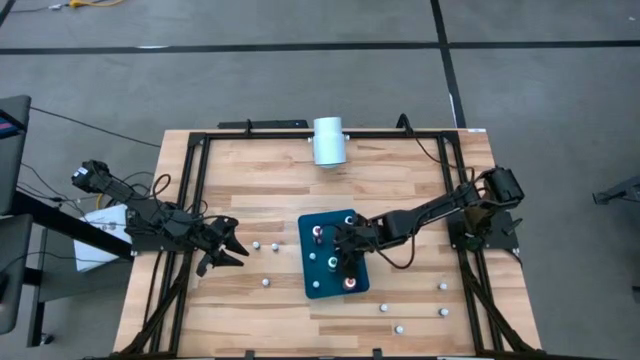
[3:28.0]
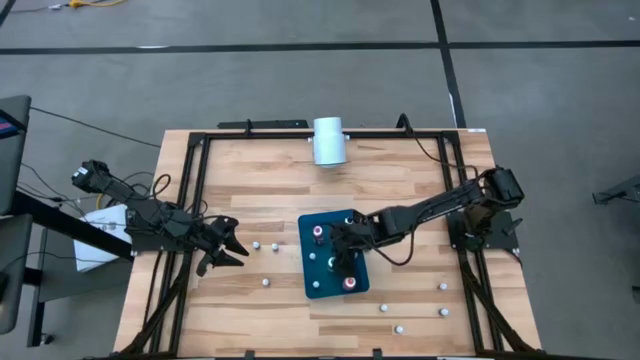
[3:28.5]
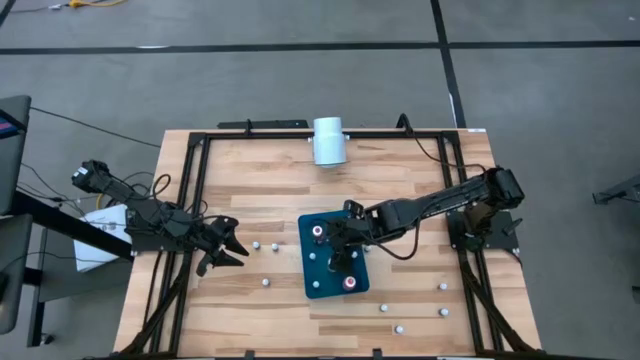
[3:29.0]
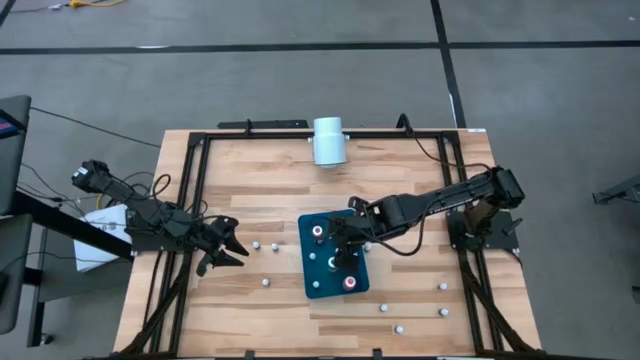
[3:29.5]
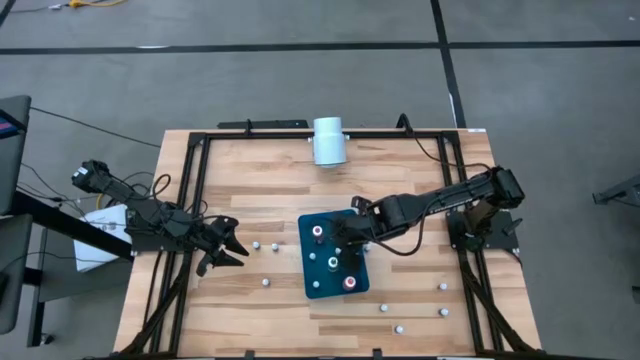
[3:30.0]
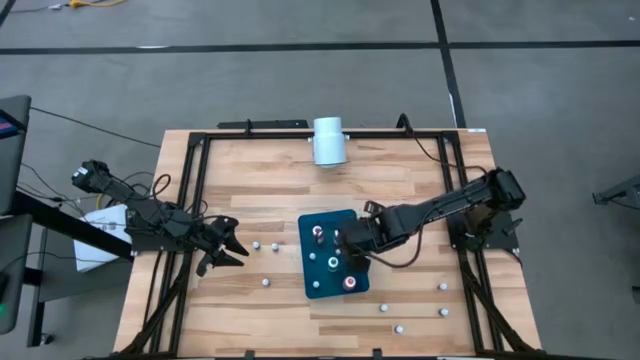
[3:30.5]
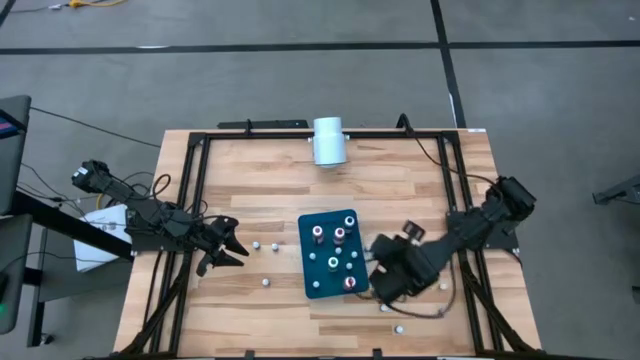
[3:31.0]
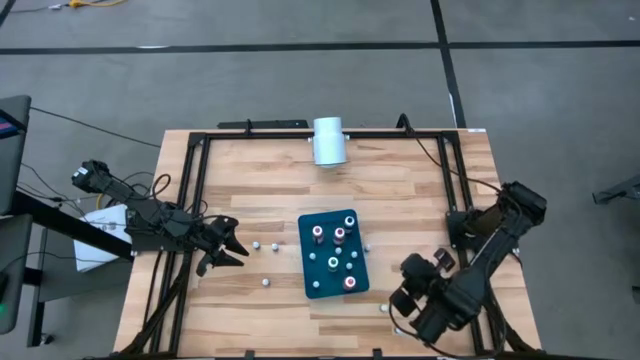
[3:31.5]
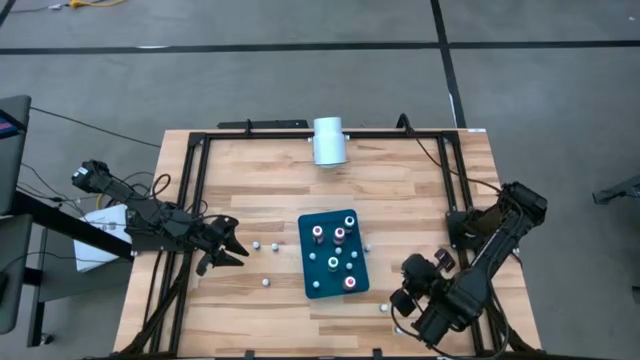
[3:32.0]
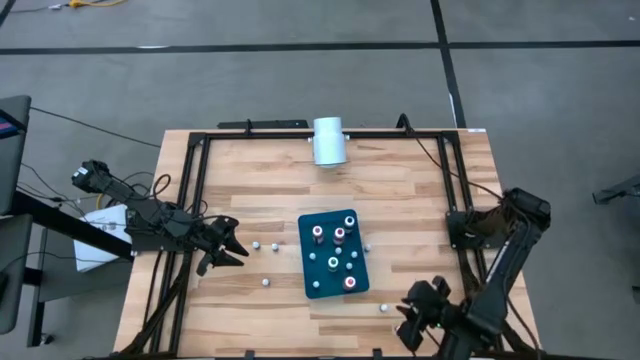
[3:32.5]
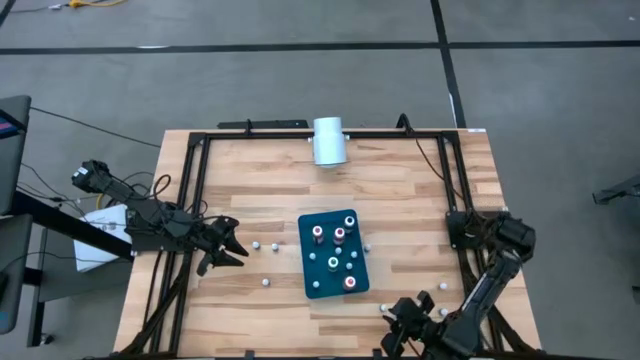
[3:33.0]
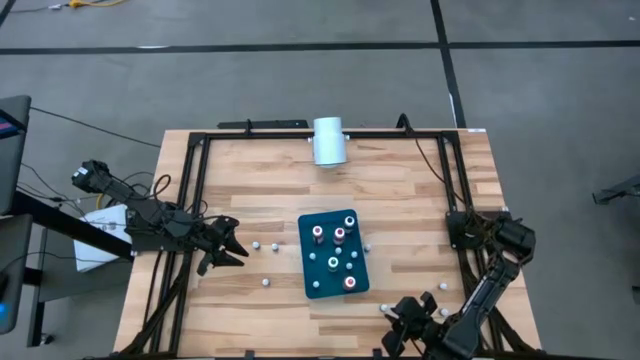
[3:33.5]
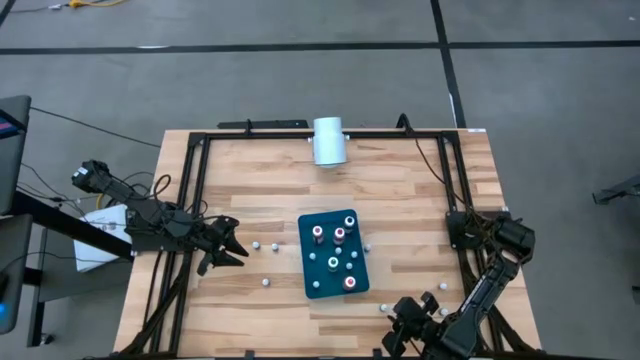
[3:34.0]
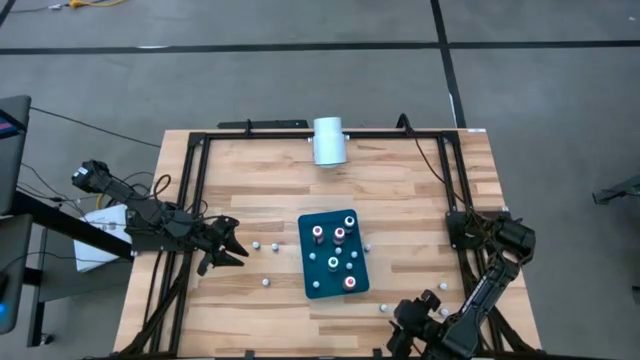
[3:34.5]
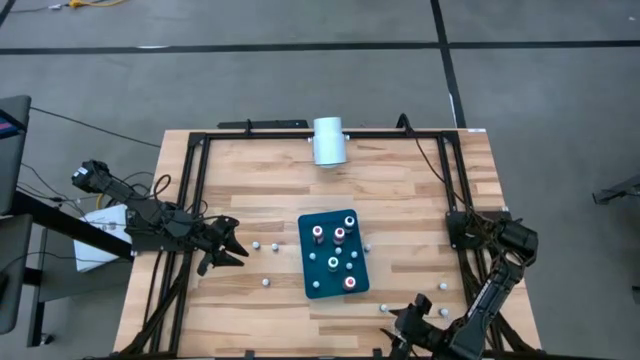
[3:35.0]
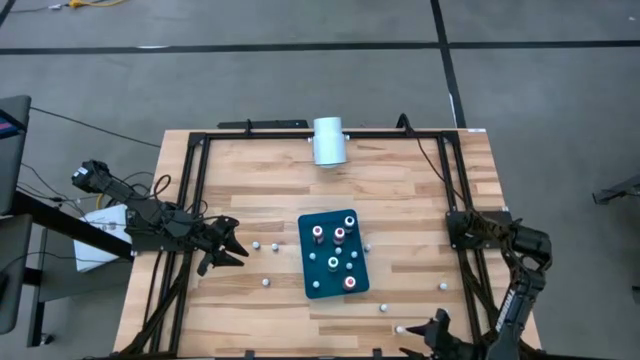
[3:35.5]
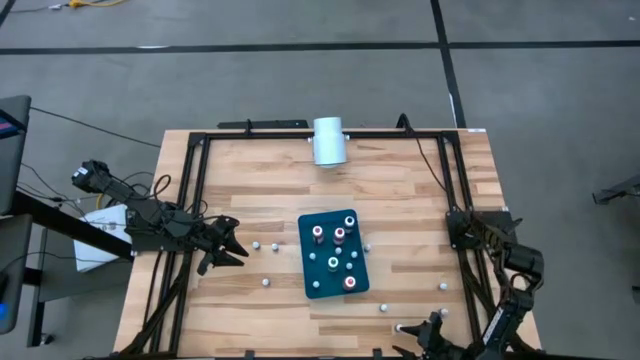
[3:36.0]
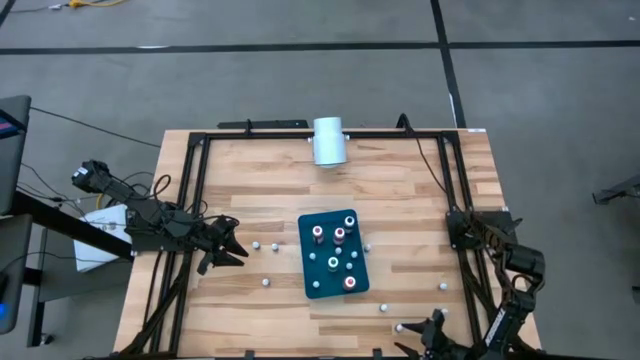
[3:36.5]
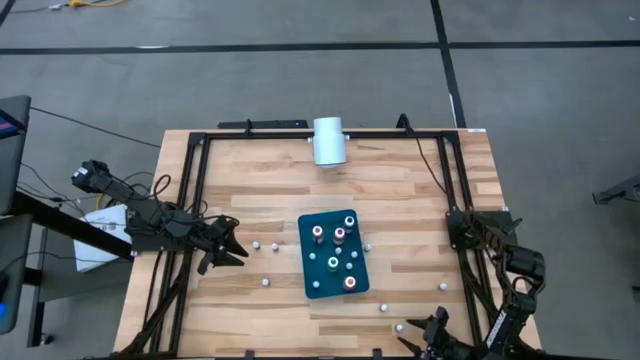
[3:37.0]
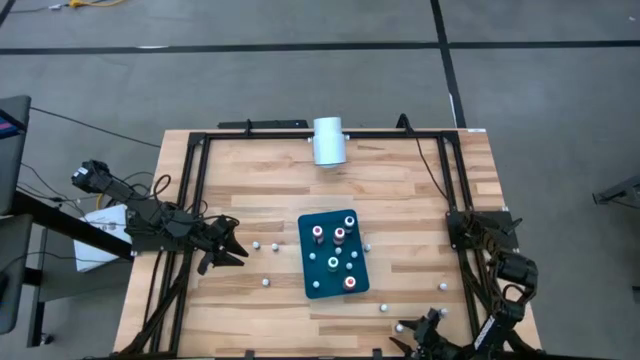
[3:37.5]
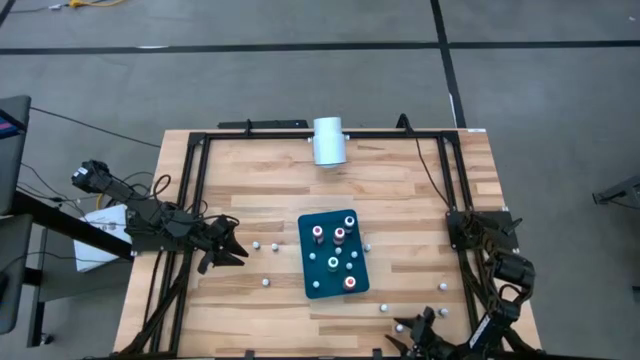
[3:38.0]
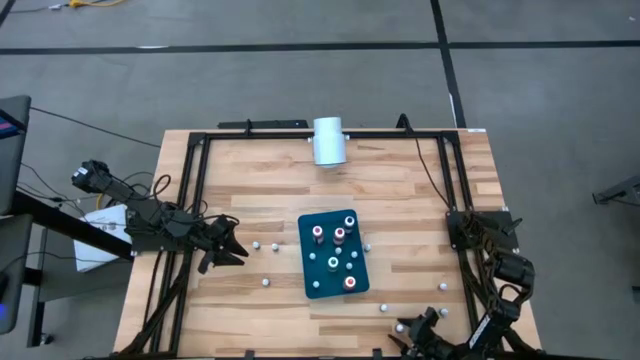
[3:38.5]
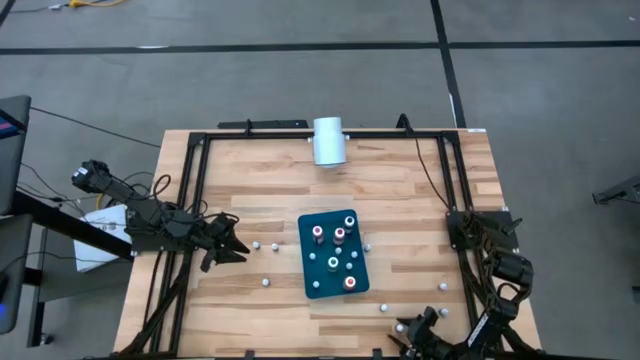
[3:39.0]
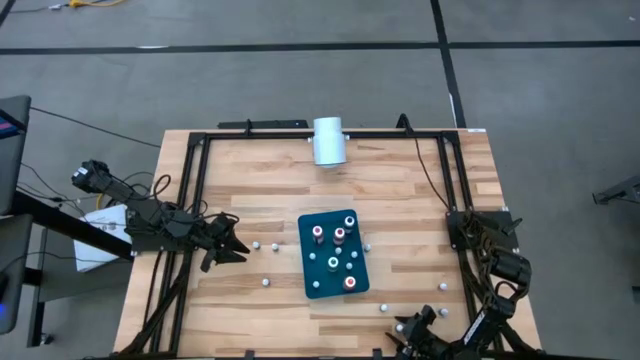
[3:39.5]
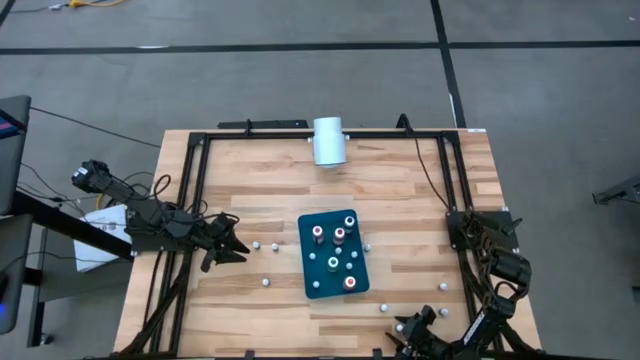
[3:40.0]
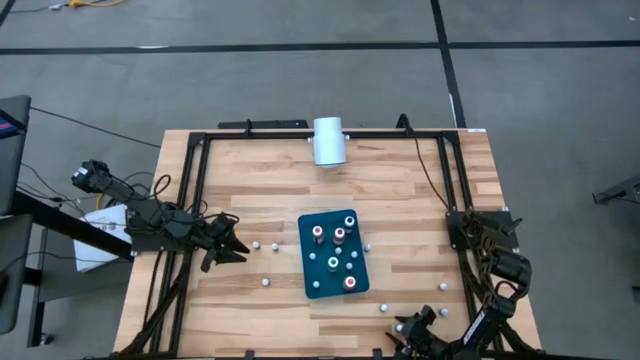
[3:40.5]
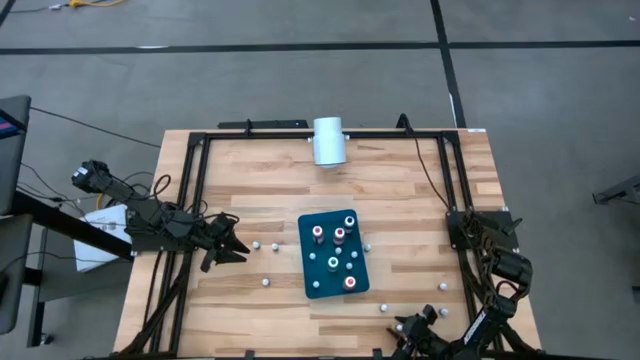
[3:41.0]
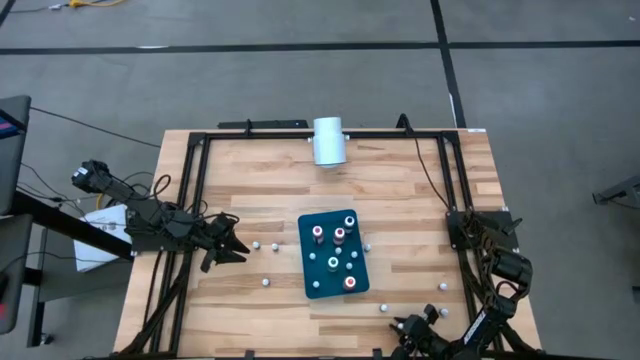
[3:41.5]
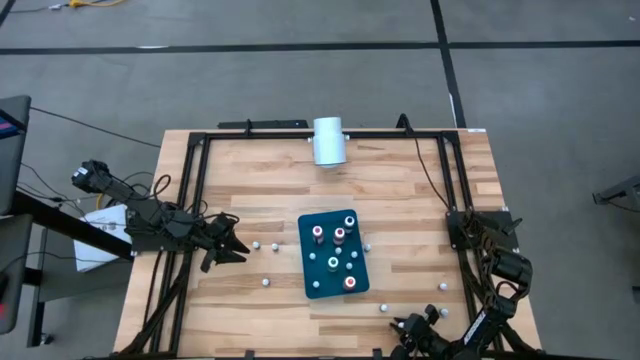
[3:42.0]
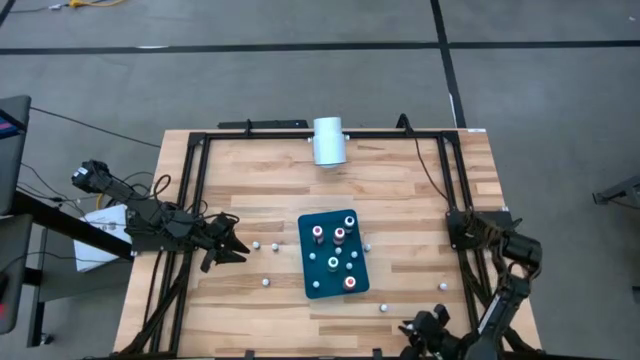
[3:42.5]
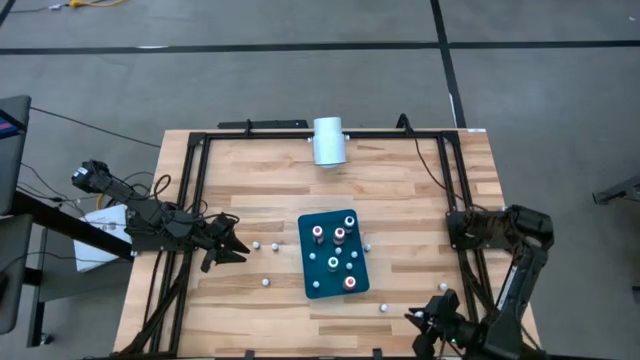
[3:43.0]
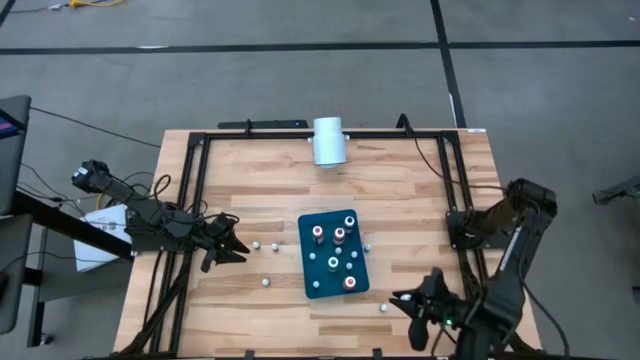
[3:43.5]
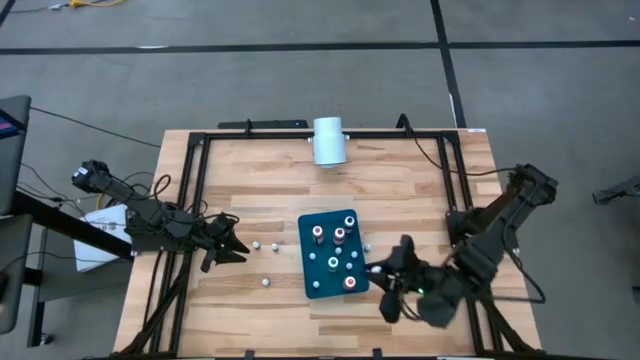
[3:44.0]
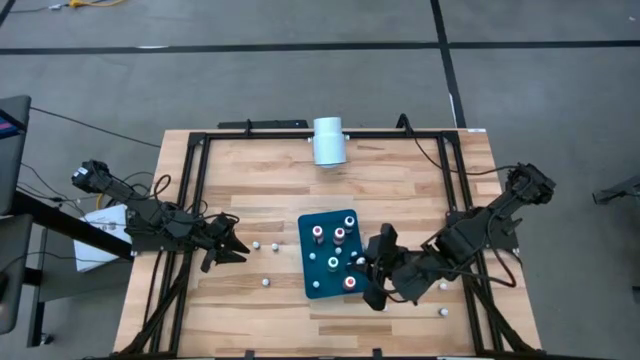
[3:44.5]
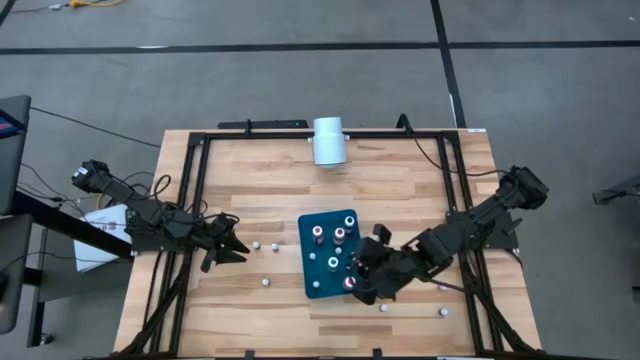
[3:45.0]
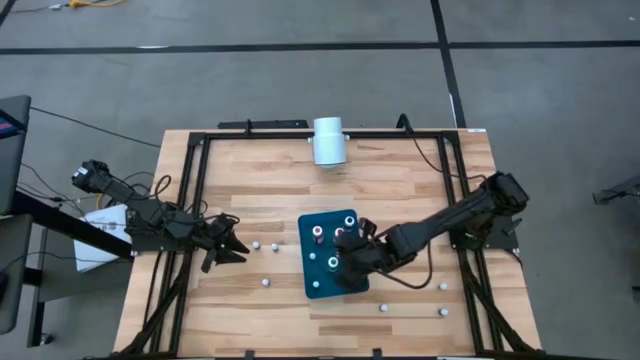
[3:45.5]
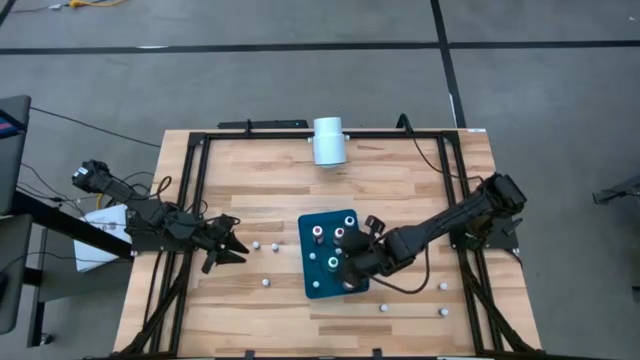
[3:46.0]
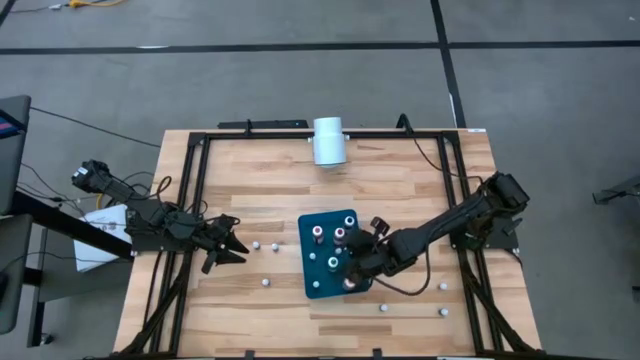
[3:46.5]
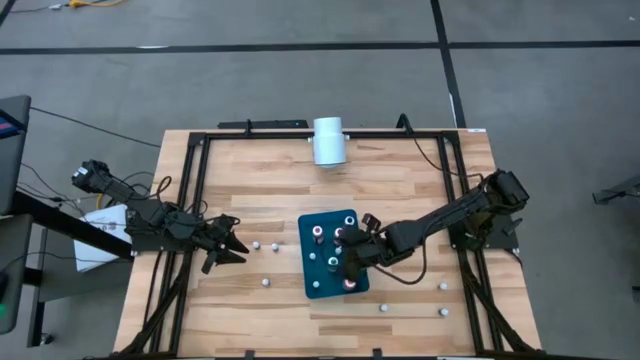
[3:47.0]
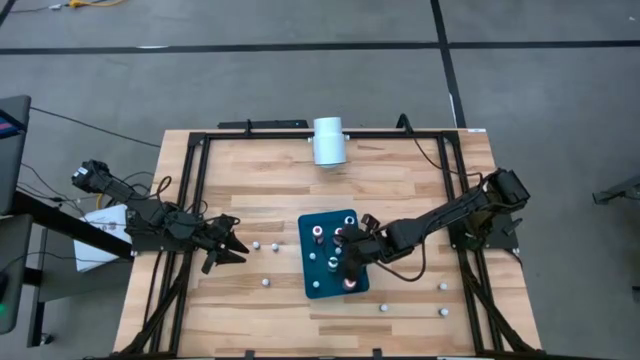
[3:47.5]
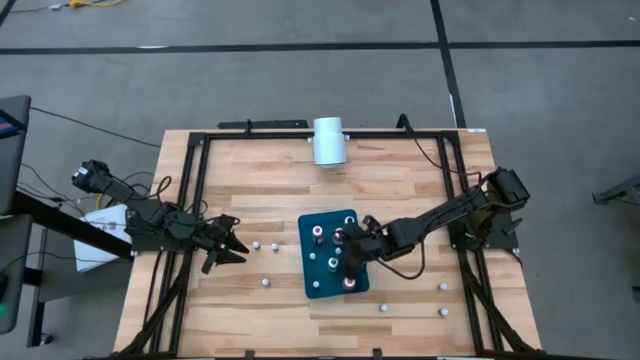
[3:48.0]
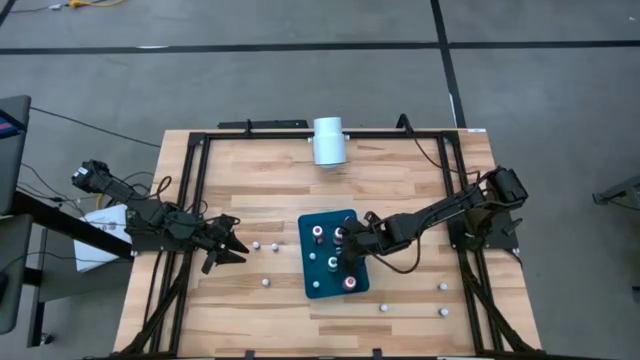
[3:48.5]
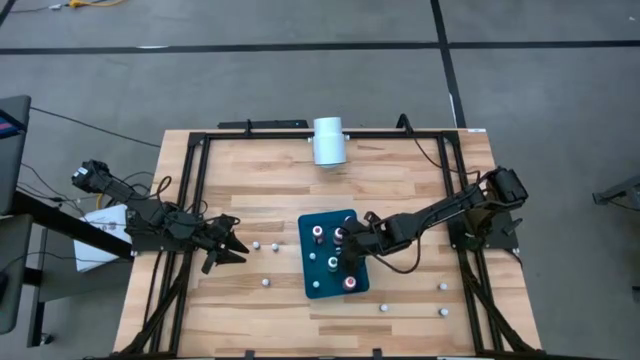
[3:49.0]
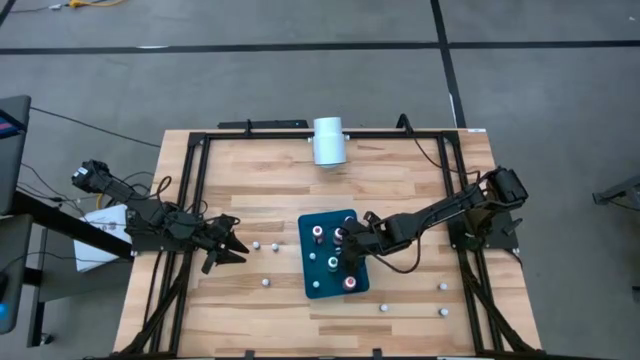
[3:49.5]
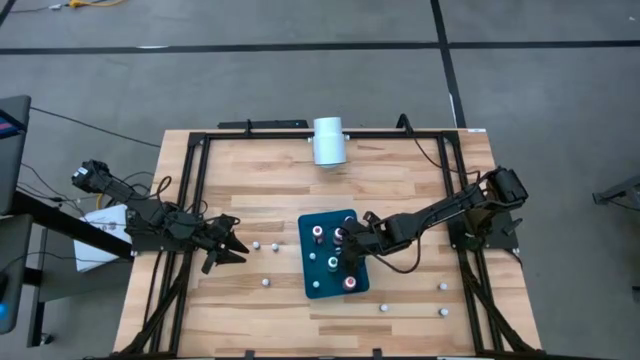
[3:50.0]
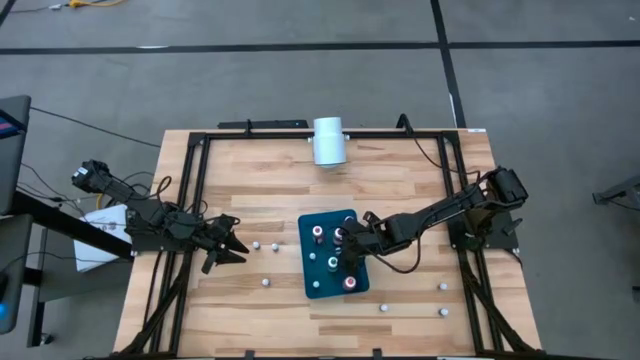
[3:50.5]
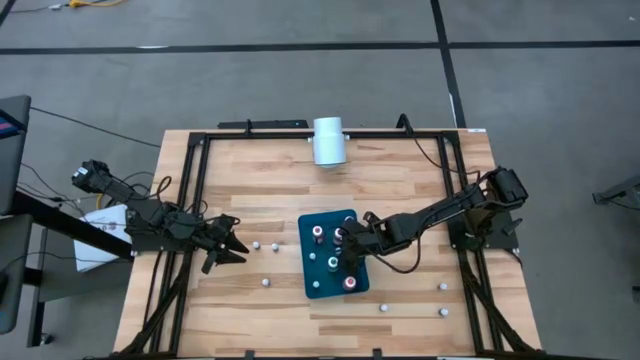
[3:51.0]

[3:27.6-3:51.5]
Task: Pick & Place food coloring
Put the small black food coloring bottle into the blue bin
